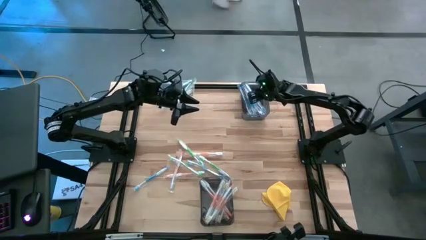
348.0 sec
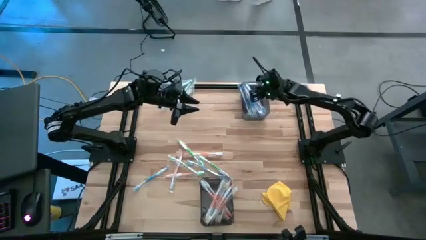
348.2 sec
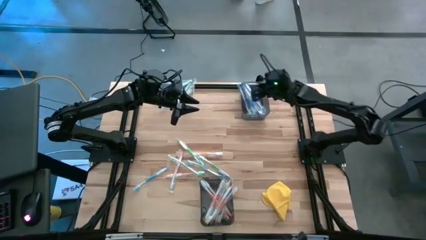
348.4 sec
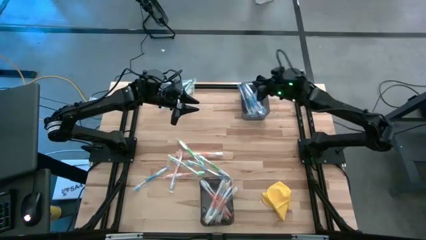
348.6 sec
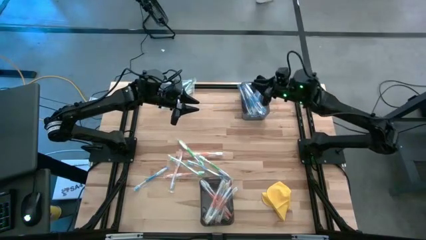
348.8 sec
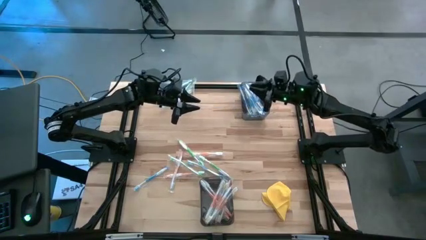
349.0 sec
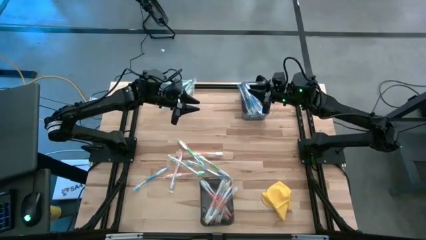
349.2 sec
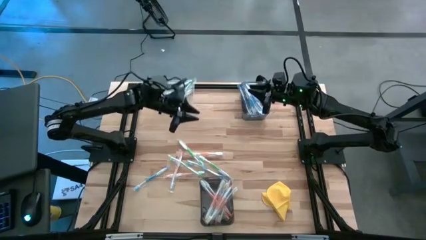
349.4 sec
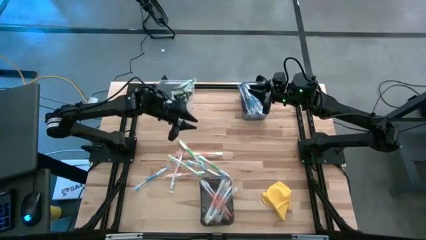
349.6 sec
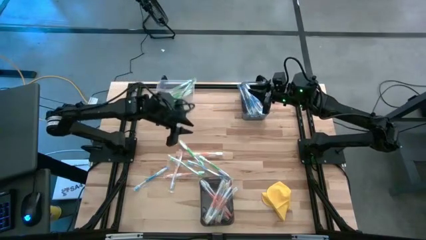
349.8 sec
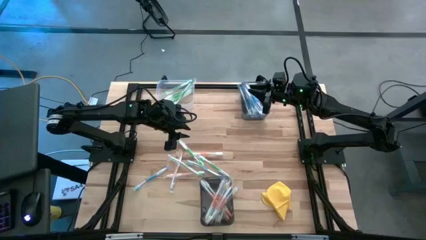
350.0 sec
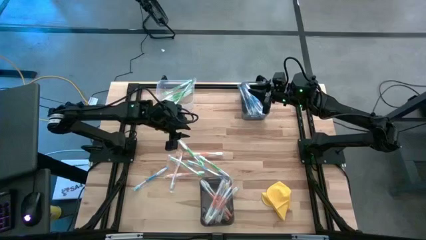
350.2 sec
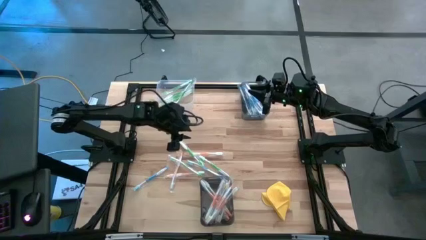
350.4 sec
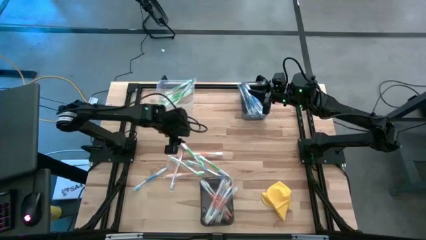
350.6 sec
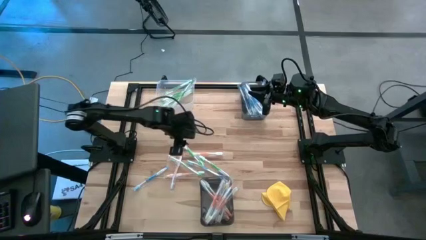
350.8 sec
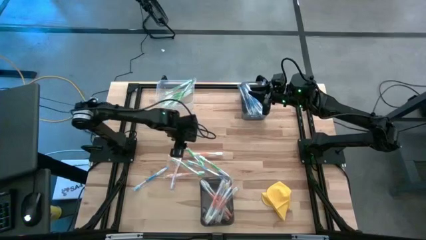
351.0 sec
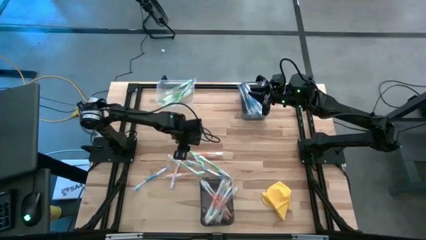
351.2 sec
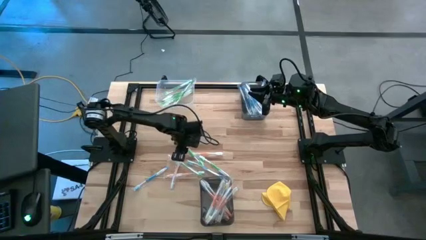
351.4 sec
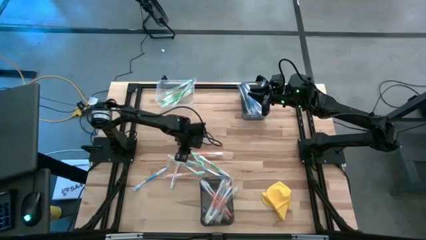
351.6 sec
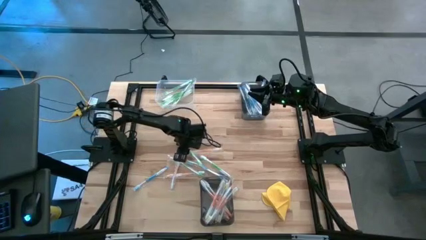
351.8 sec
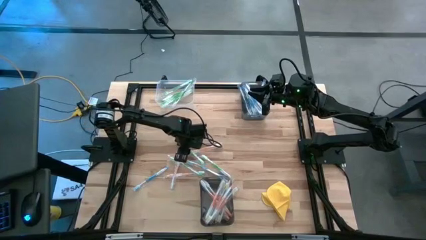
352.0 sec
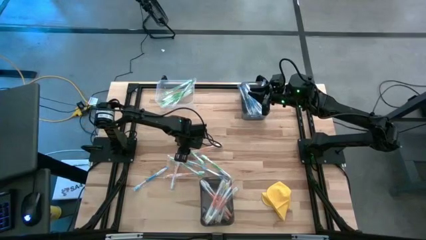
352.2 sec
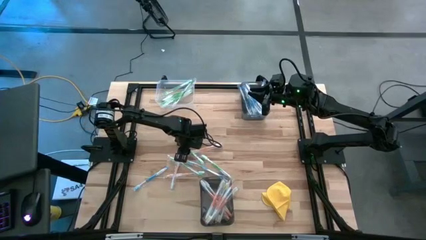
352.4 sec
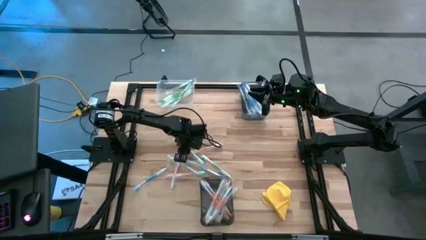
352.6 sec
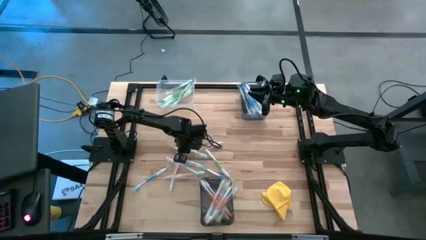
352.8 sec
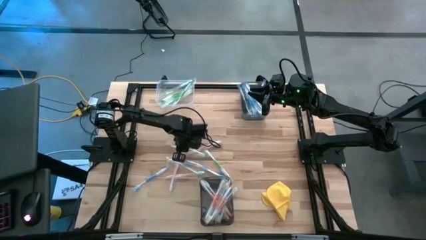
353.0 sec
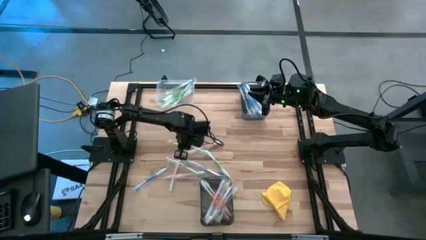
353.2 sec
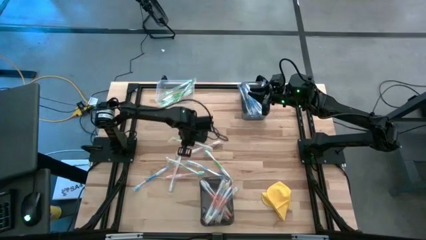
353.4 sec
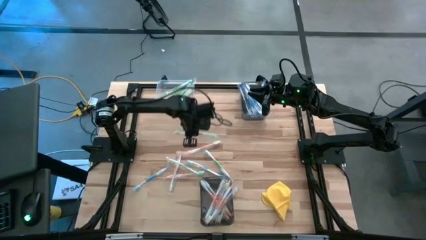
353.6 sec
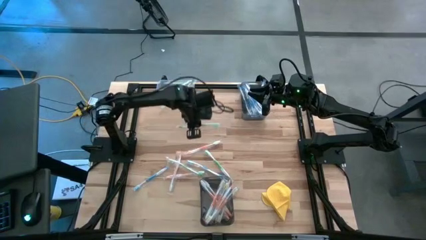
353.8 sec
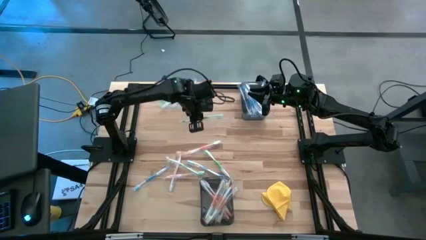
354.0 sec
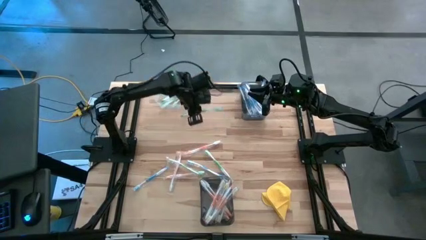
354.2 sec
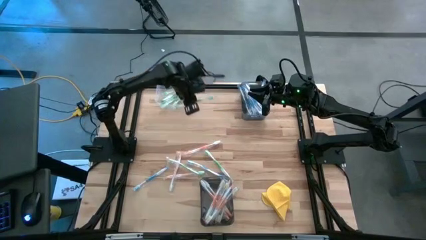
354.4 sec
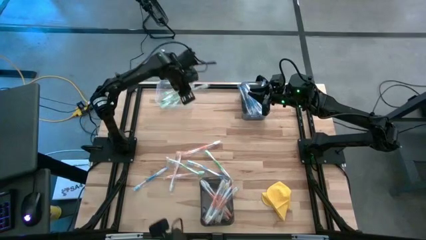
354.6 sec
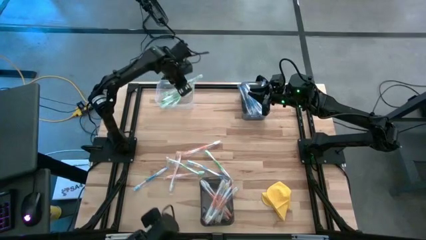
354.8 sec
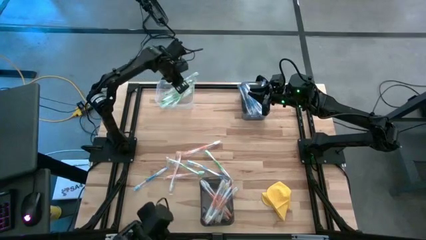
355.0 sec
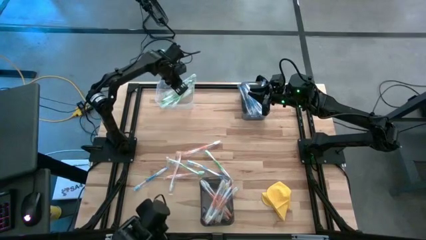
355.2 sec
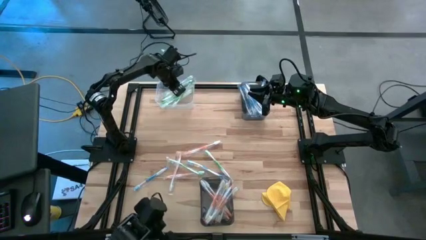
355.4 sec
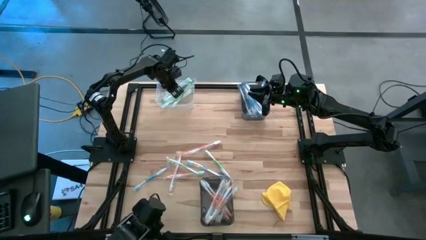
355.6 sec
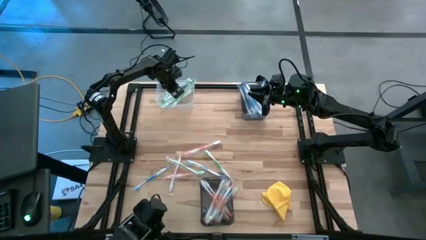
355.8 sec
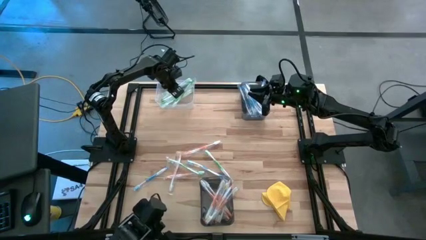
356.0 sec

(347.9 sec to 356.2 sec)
Task: Pick & Place Toothbrushes
Put the green toothbrush into the transparent bin

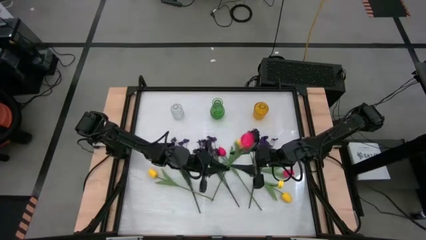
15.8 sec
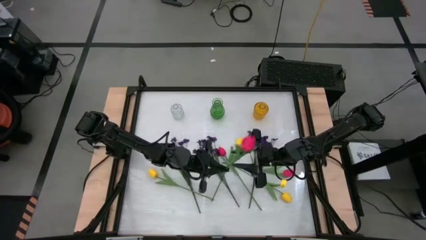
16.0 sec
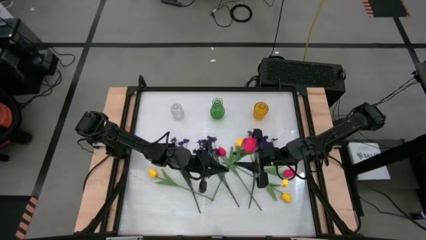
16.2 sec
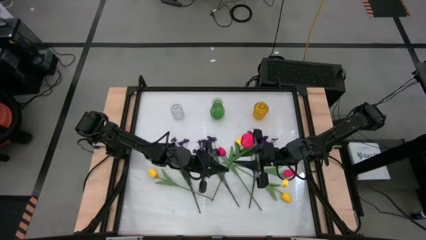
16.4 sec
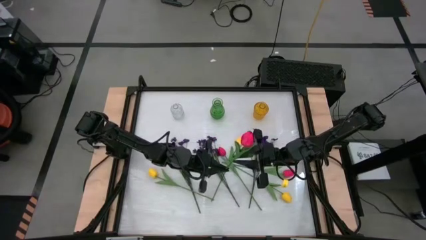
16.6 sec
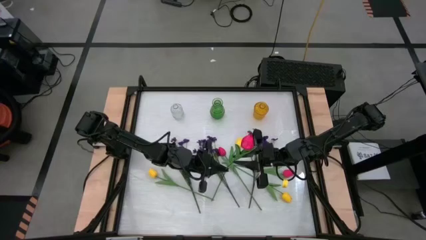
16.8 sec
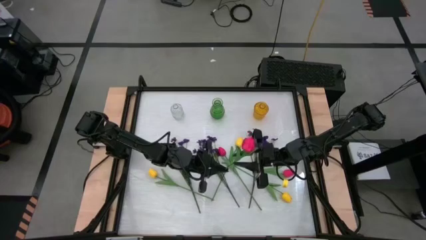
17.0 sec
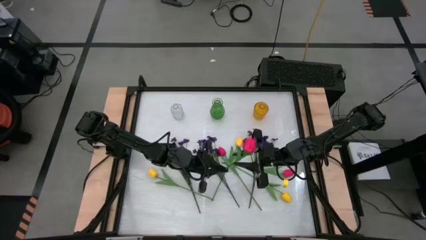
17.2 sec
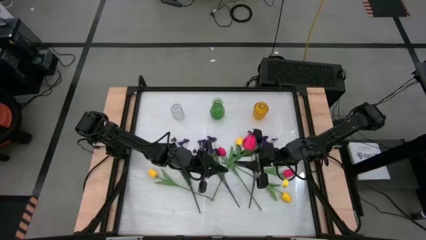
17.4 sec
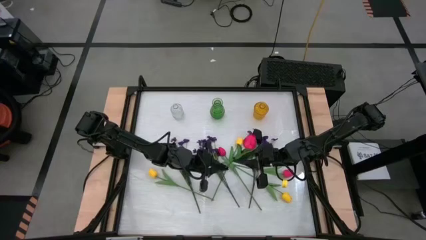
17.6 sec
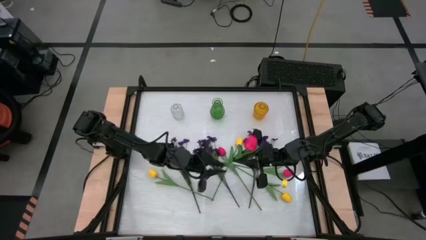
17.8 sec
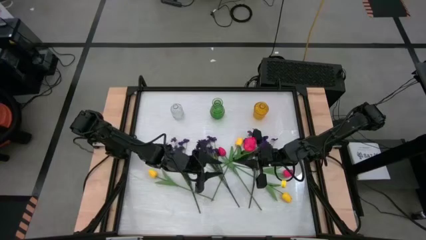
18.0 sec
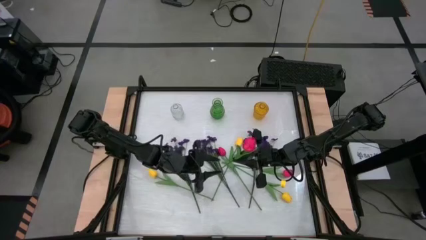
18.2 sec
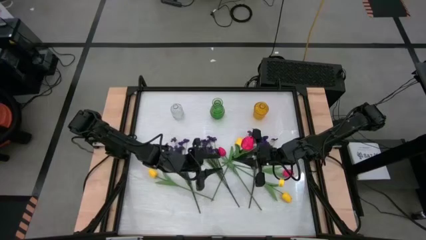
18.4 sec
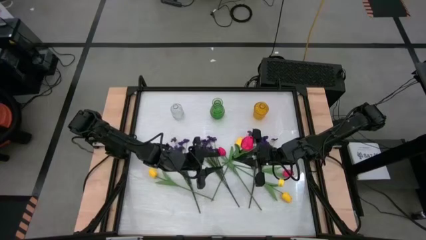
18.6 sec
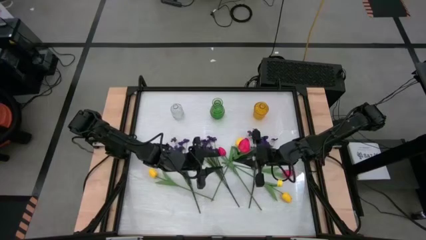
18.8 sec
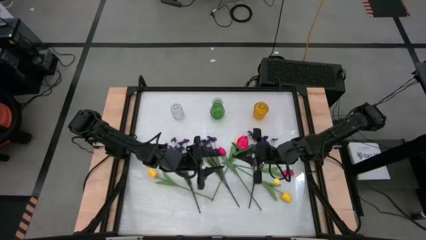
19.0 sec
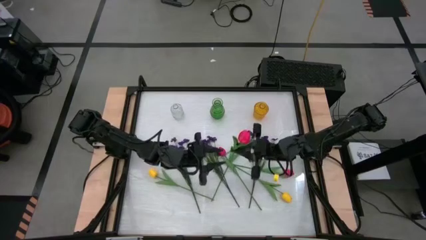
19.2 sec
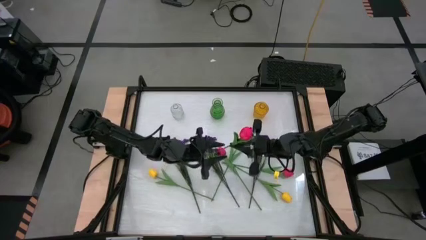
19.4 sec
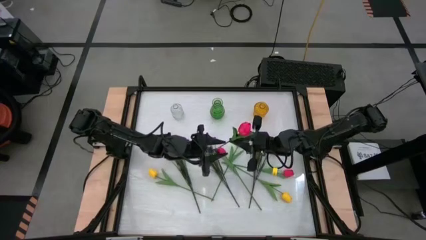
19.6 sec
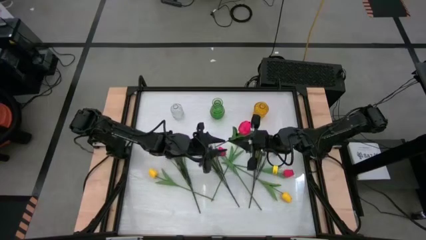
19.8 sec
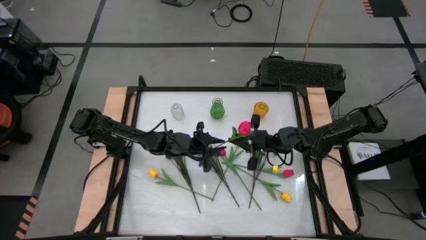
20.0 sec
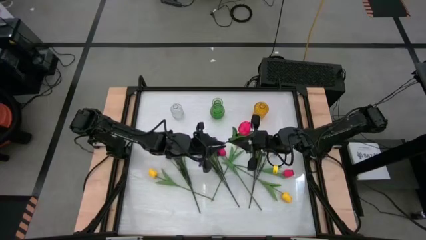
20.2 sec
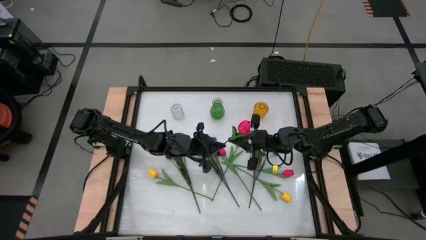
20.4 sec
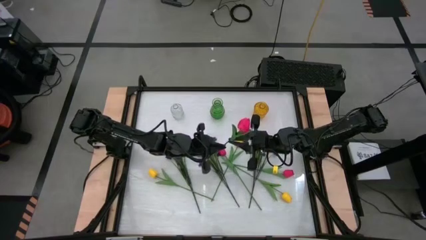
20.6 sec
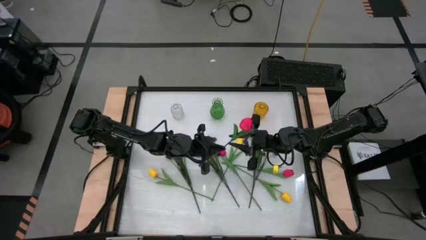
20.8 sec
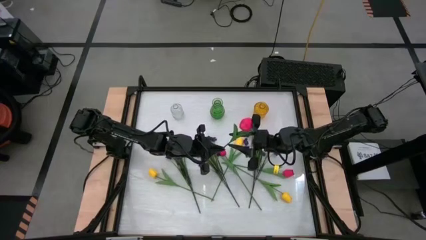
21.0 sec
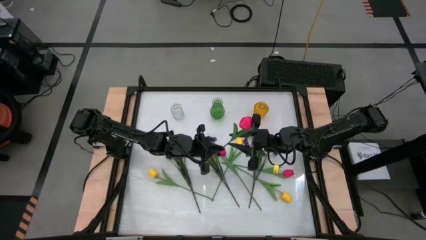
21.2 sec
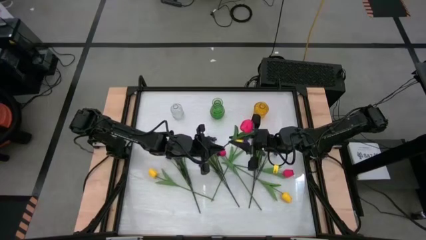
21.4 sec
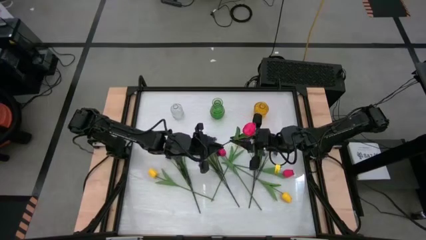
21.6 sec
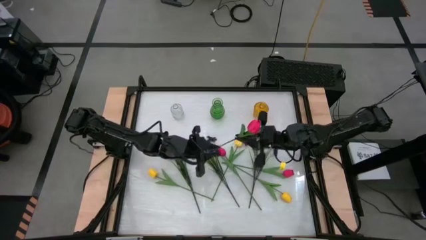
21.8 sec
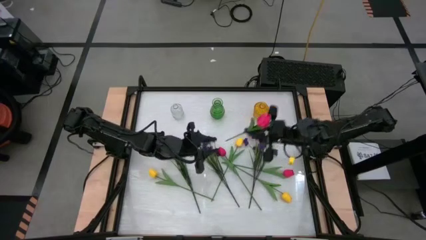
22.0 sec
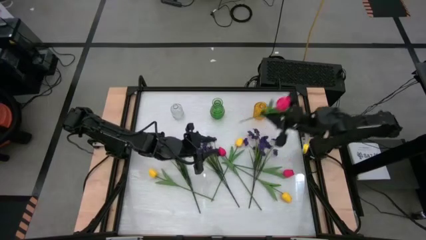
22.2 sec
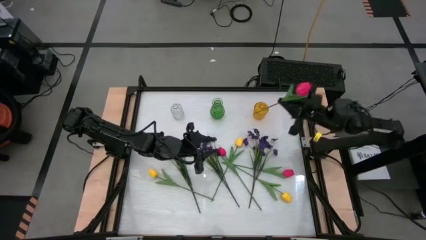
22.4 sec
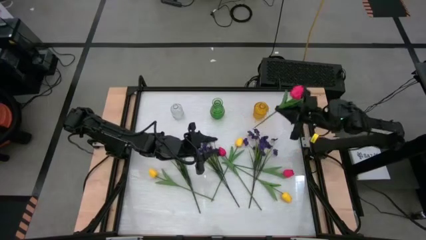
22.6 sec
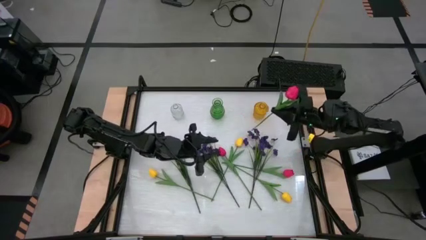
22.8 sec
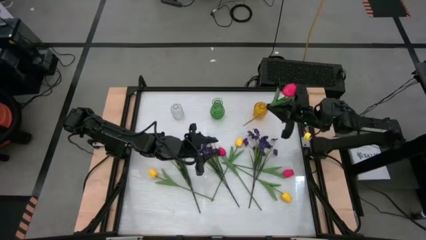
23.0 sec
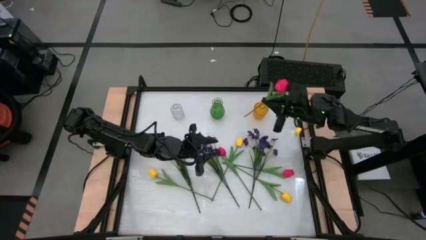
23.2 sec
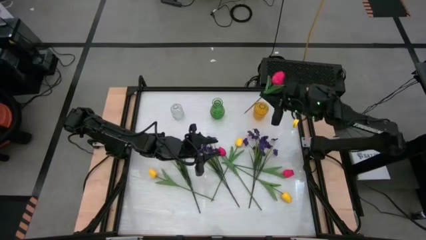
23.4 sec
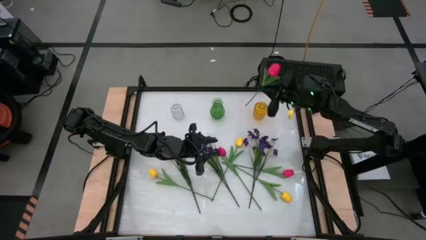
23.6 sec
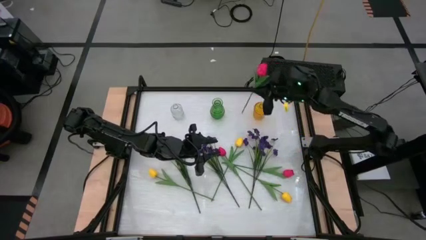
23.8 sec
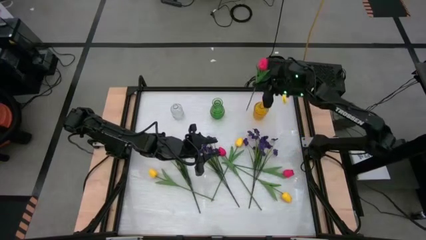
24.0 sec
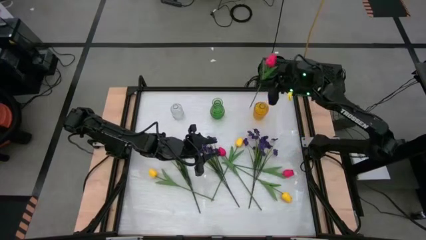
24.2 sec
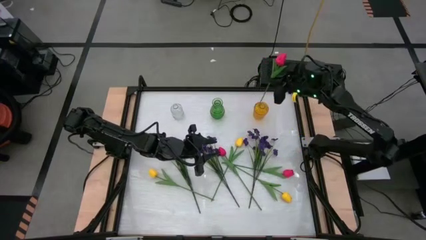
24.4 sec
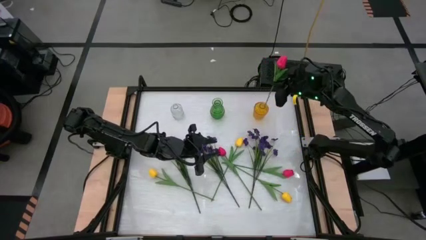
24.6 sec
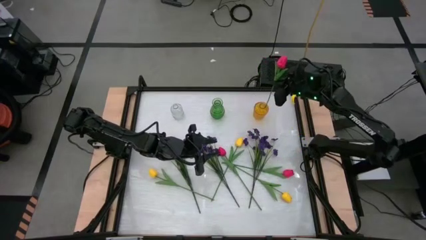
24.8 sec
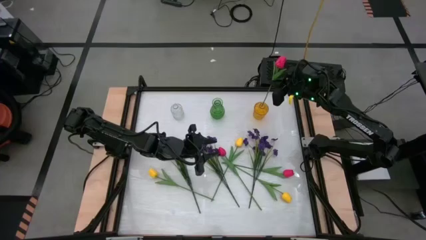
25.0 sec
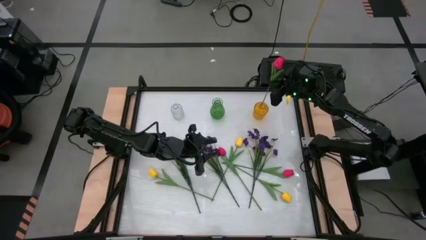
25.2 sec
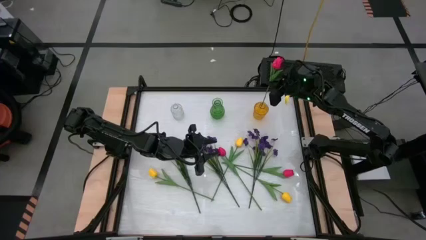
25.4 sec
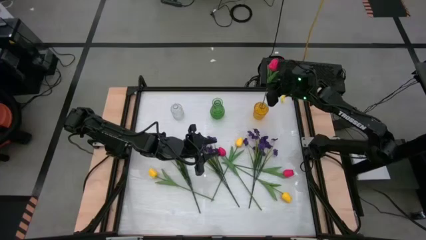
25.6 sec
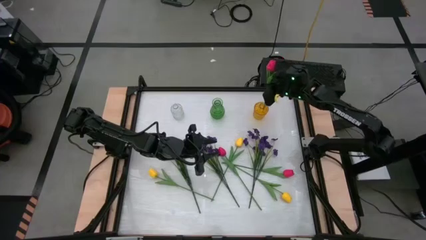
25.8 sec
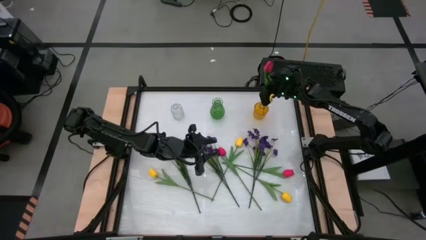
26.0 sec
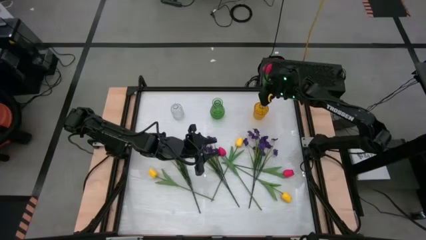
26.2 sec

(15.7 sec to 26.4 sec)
Task: Sort flowers into vase by color
Put the left pink flower into the yellow vase
